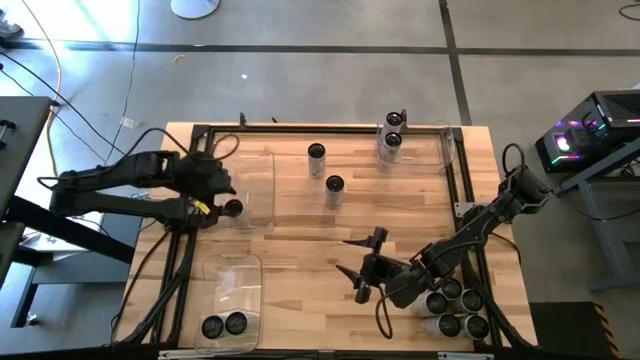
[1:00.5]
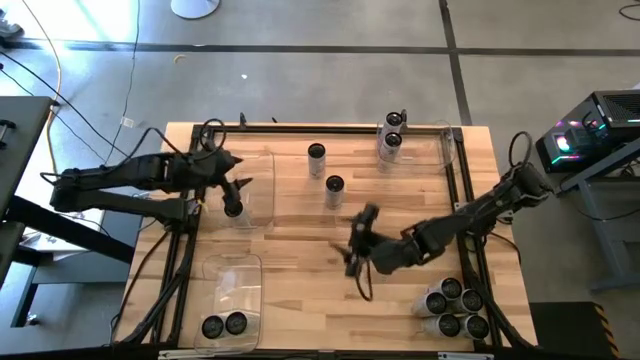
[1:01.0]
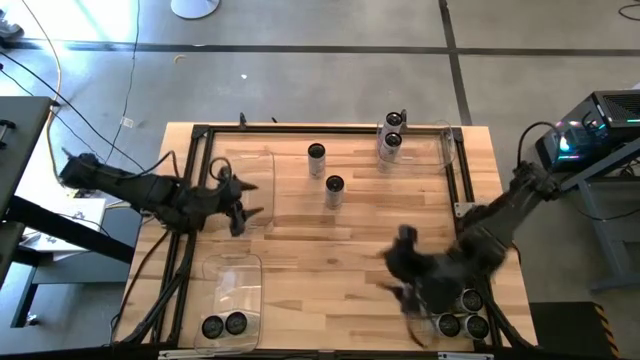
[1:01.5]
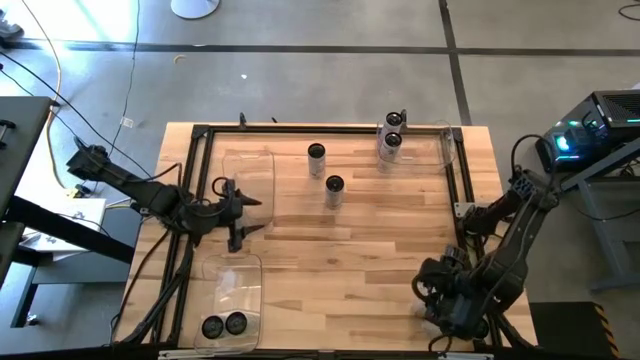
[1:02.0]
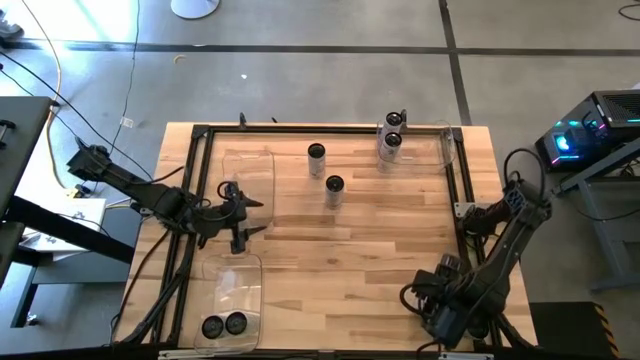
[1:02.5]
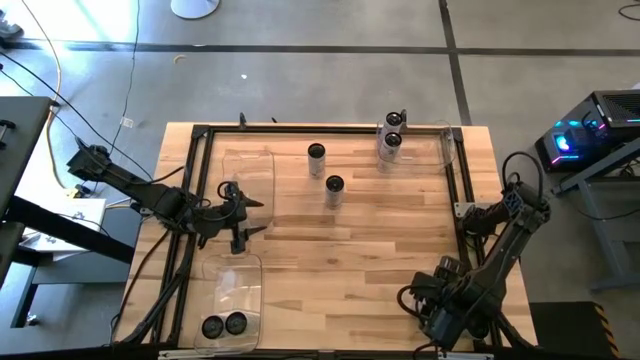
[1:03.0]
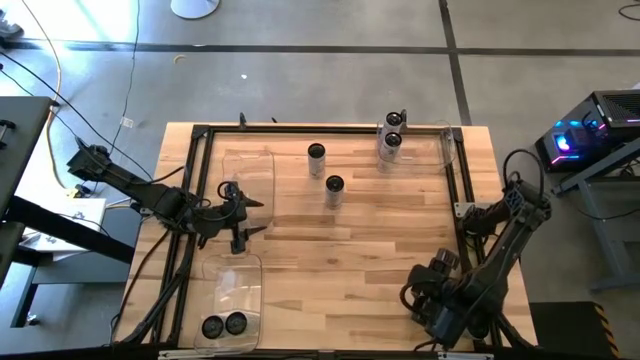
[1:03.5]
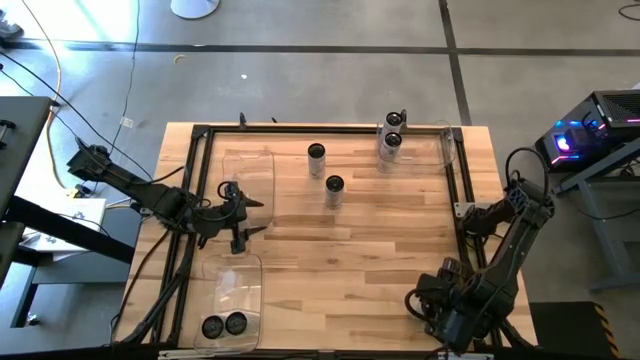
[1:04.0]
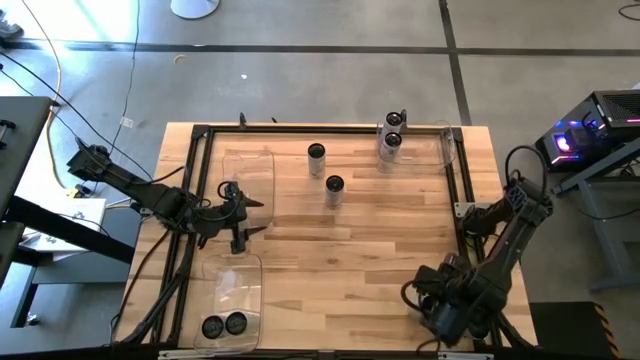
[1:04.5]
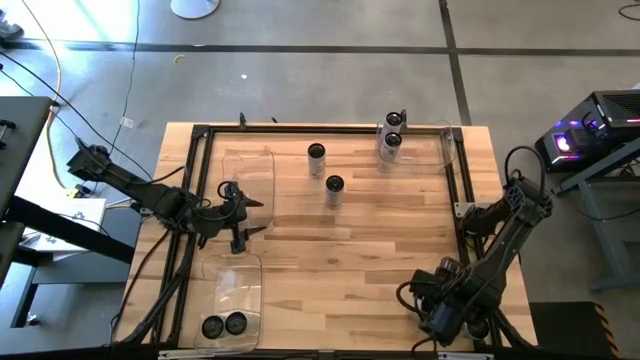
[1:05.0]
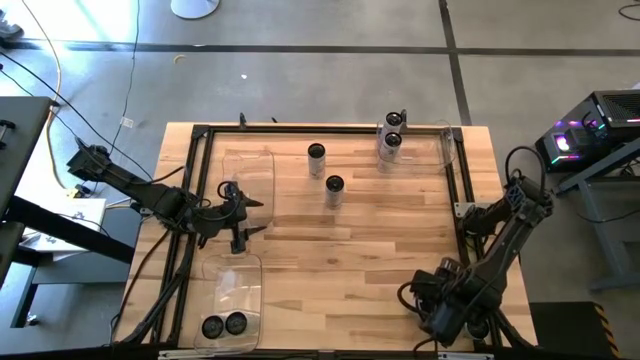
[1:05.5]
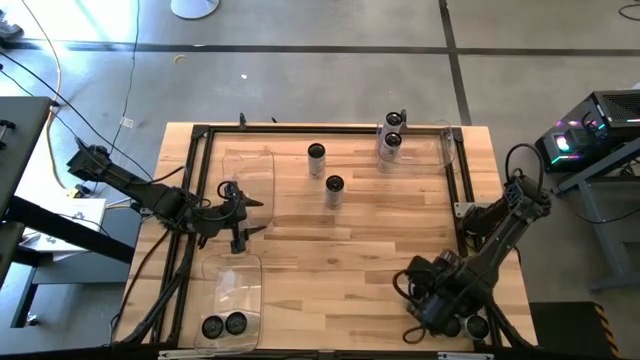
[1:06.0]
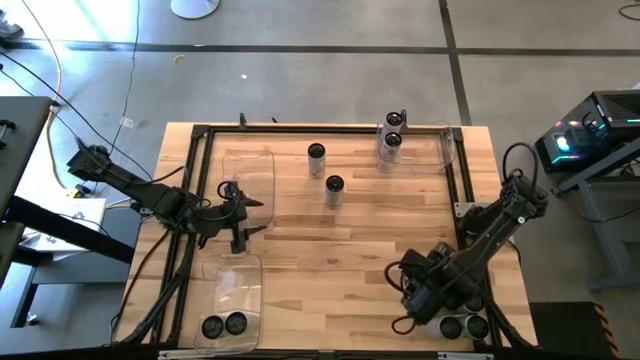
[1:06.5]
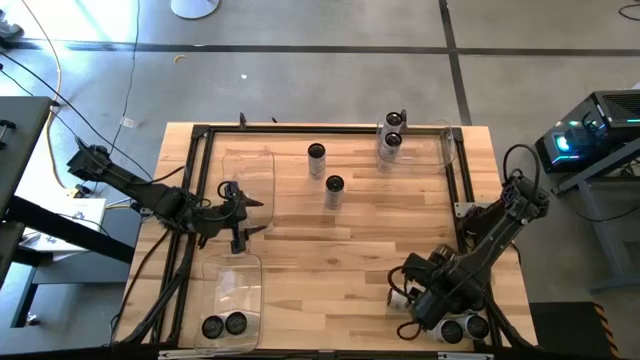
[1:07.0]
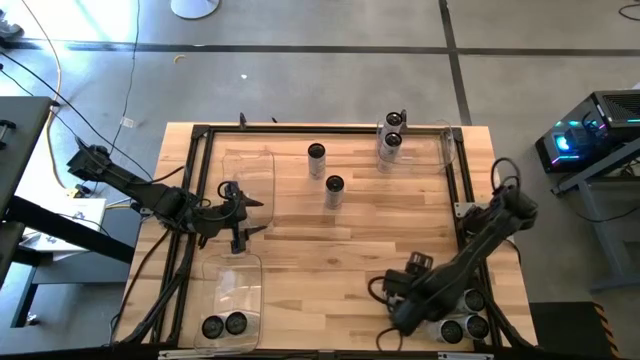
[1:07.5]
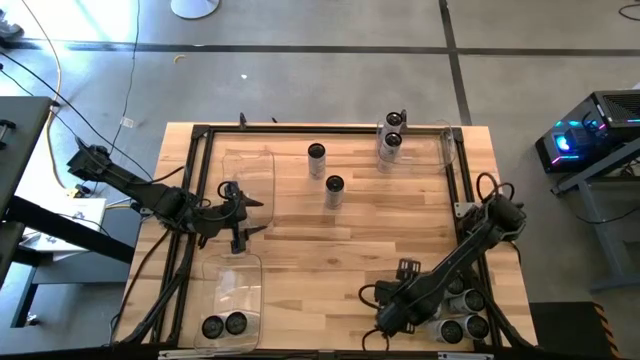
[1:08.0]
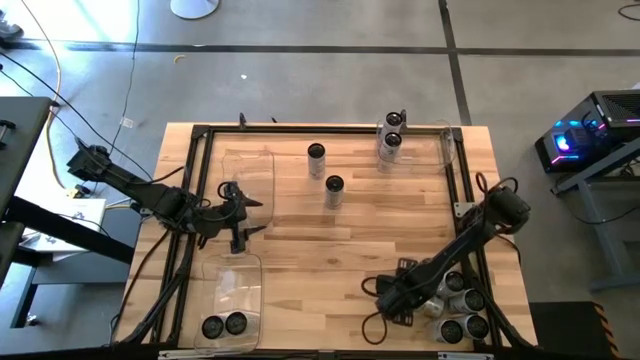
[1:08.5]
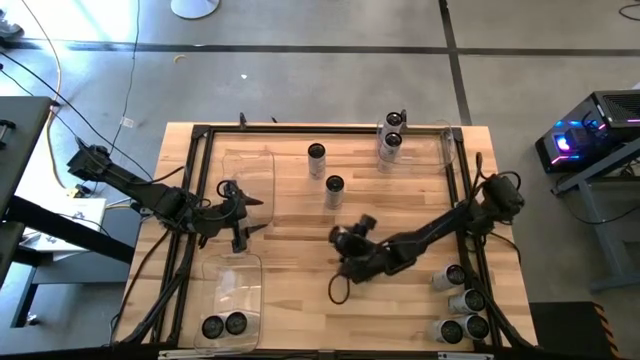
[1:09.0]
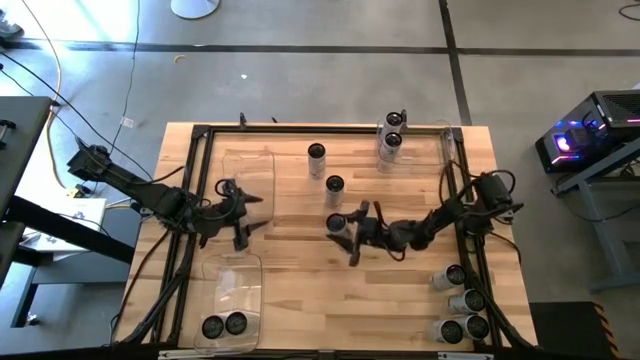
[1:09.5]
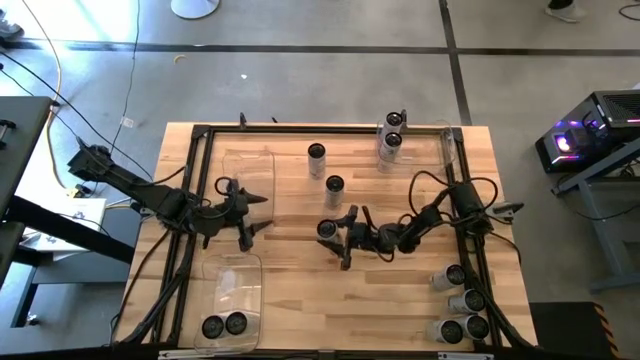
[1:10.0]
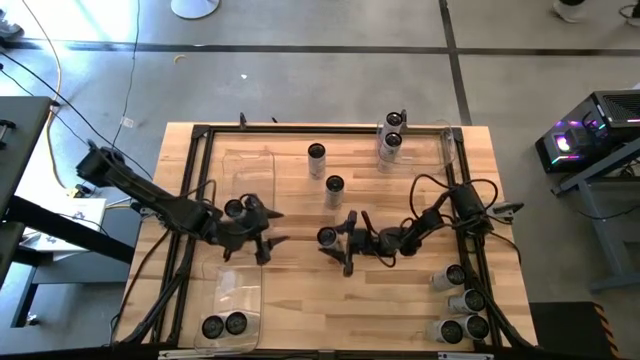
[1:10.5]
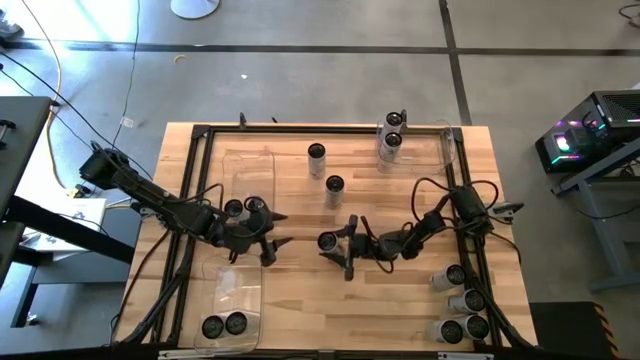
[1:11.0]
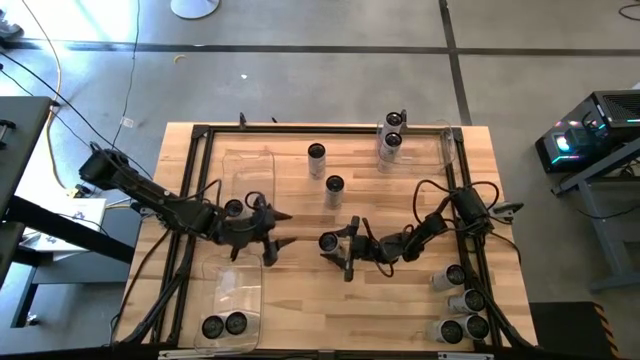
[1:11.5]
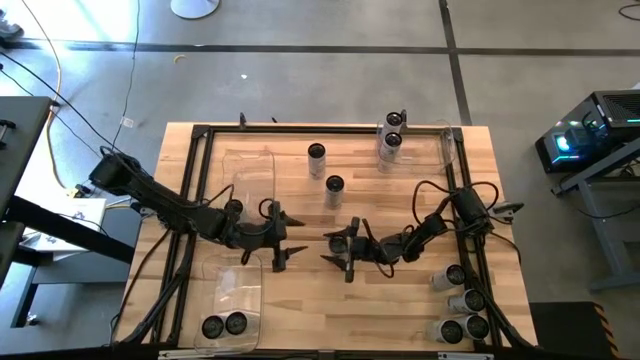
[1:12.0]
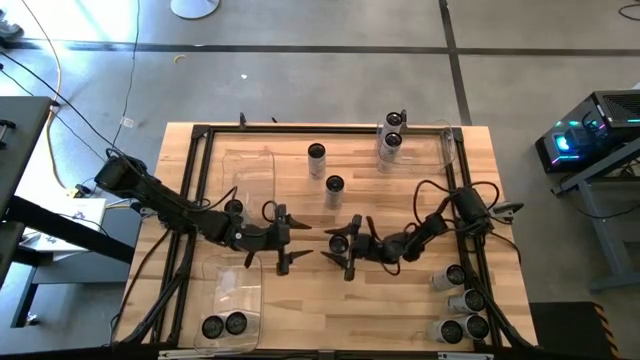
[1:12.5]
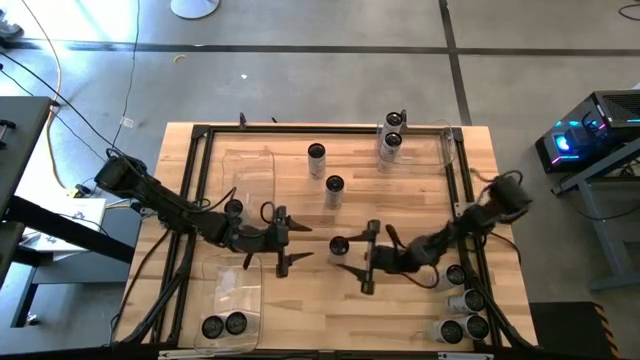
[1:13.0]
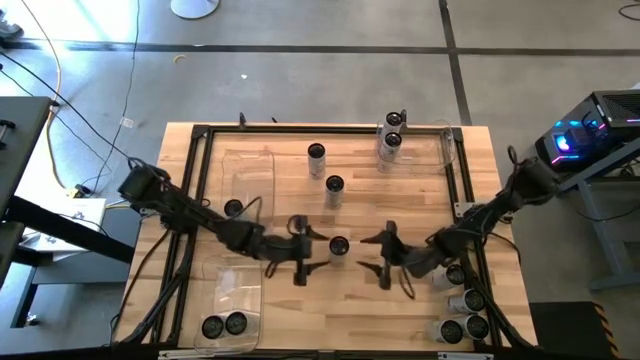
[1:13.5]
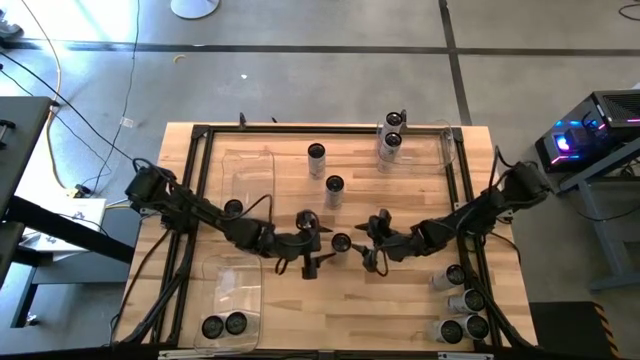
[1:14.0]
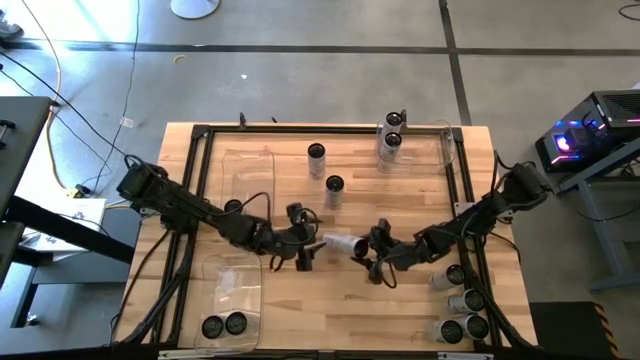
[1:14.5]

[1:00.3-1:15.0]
Task: Sort soda cans
Put the white yellow soda can into the top left transparent bin

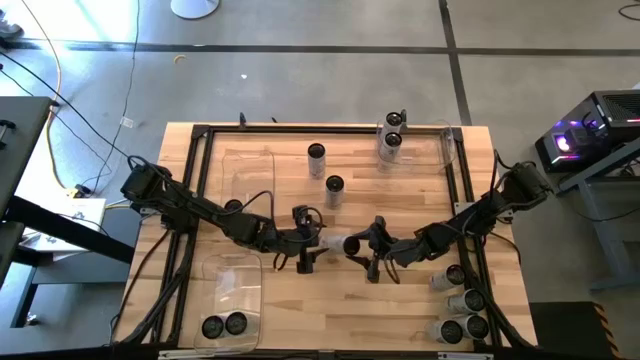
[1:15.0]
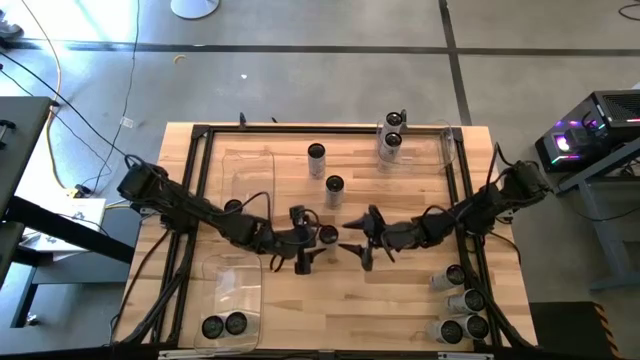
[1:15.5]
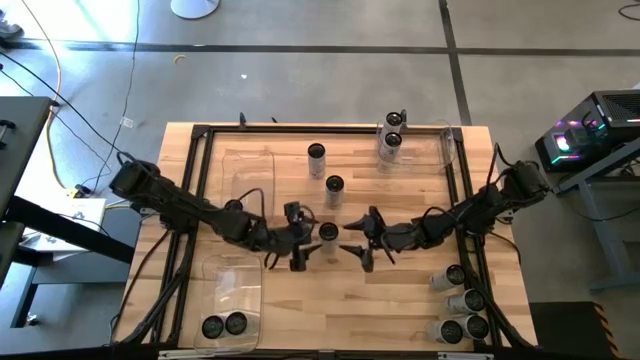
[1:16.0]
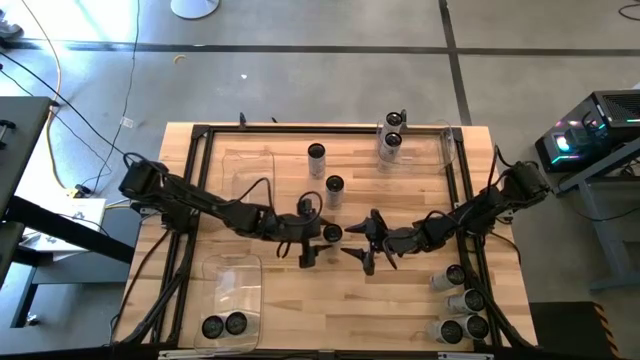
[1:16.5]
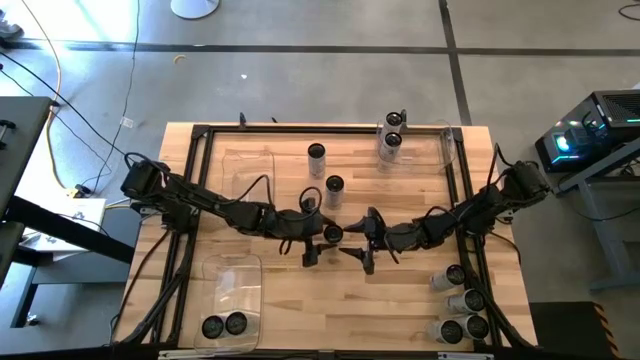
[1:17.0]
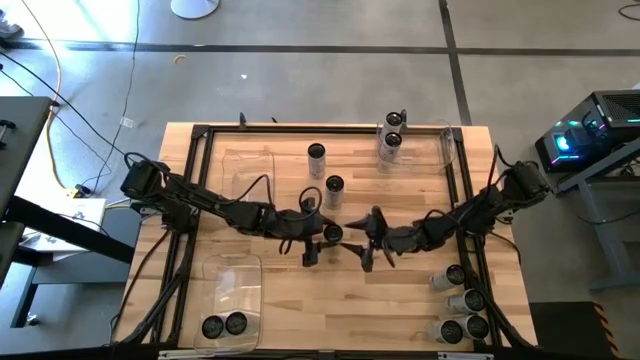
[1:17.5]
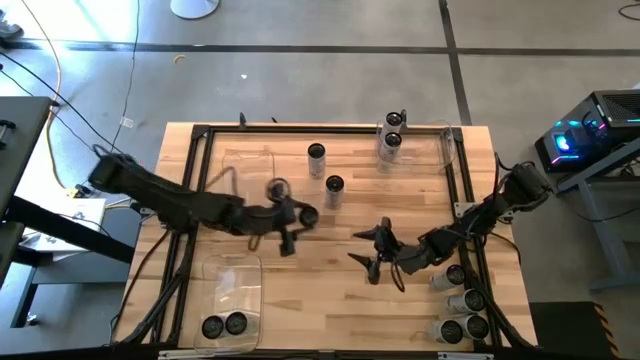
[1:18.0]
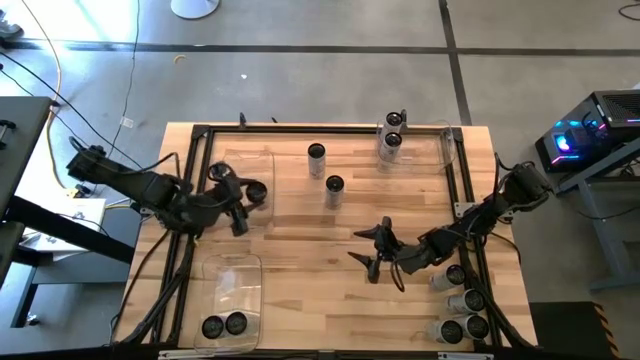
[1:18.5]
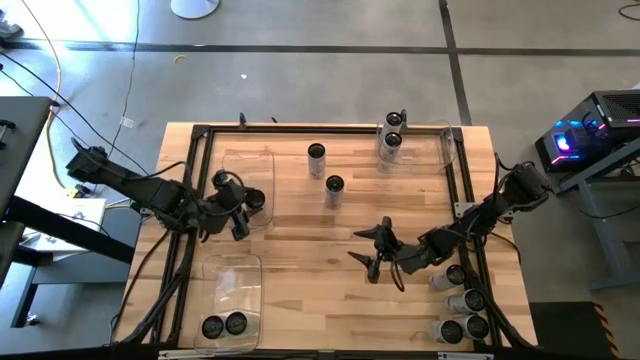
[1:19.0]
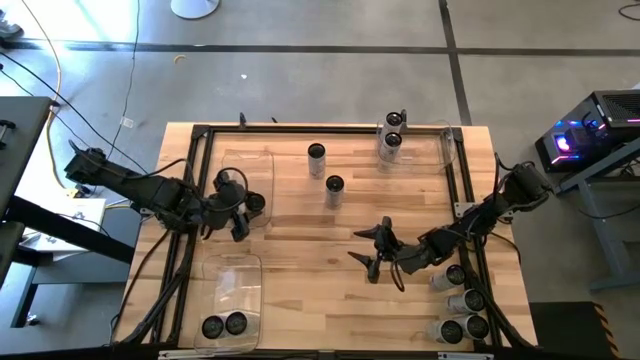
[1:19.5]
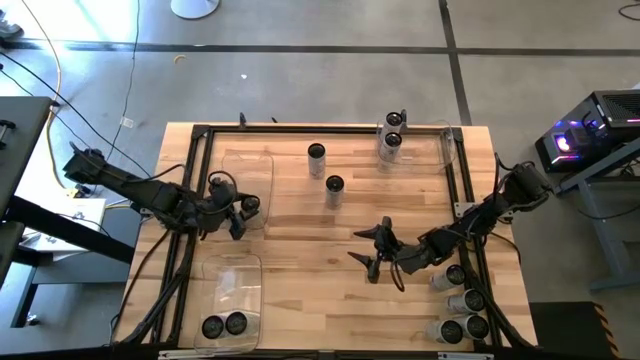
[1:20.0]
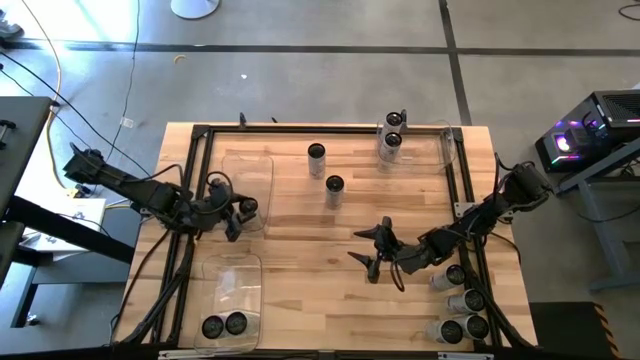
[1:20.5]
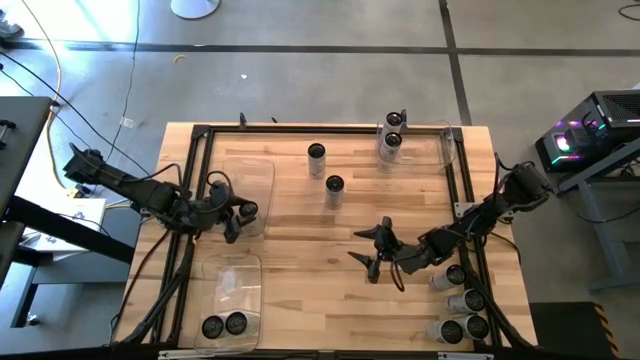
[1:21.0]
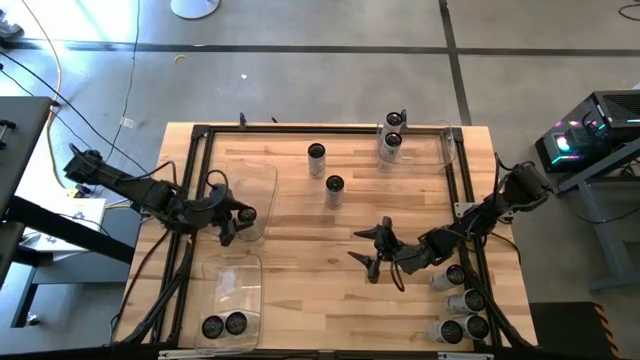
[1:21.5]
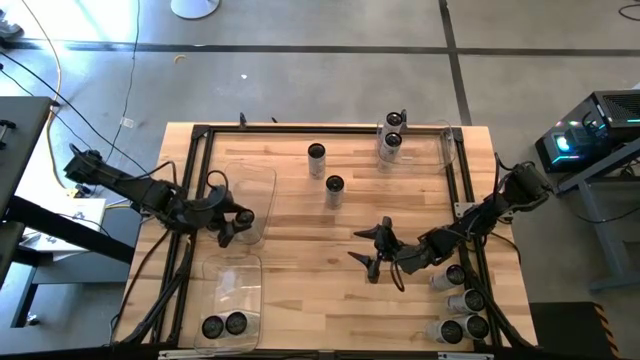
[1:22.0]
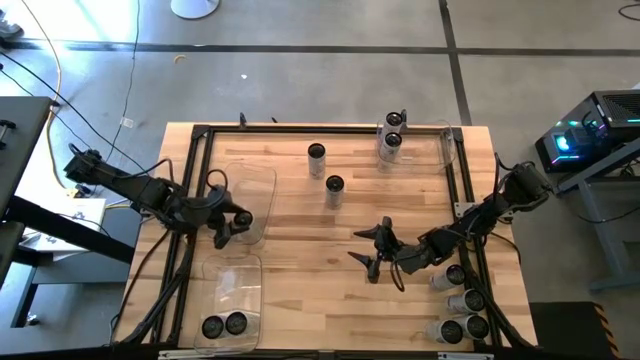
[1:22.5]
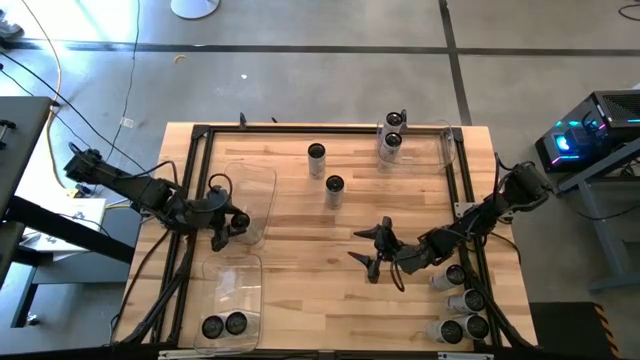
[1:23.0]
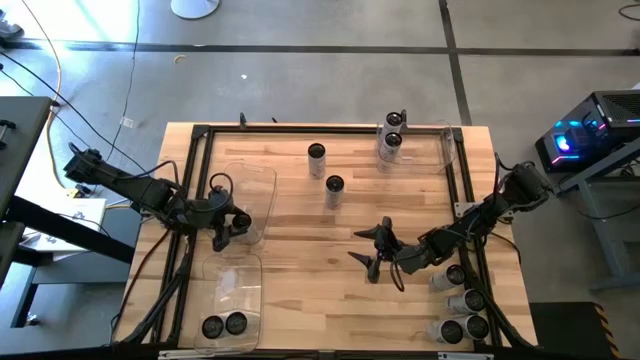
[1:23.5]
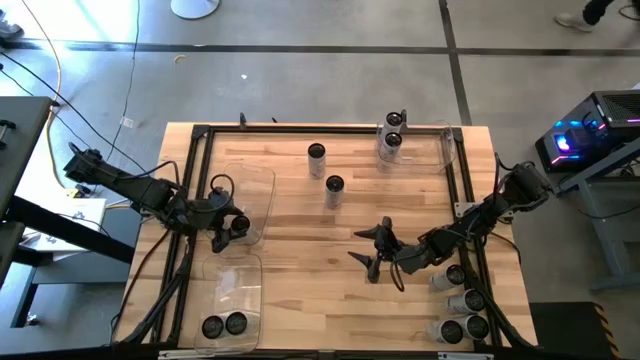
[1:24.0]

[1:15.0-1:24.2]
Put the white yellow soda can into the top left transparent bin
